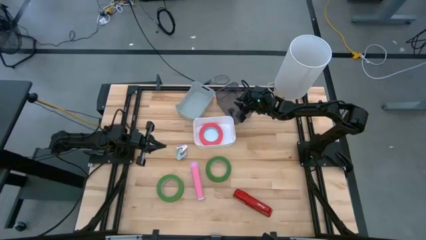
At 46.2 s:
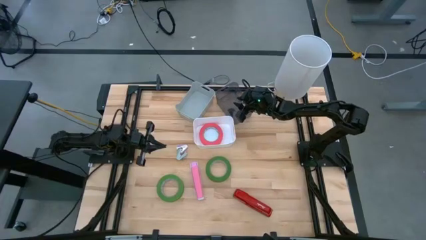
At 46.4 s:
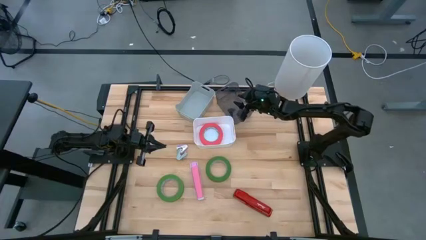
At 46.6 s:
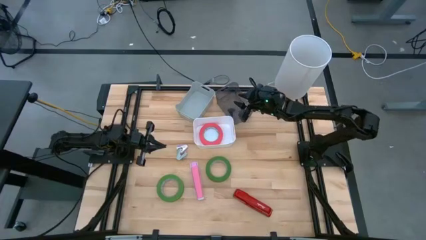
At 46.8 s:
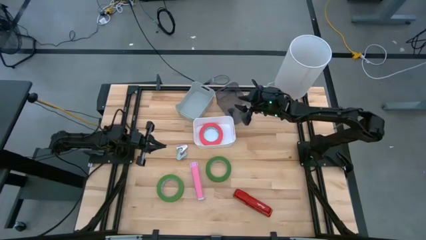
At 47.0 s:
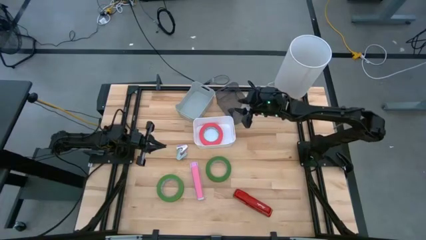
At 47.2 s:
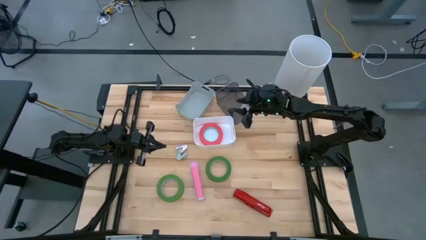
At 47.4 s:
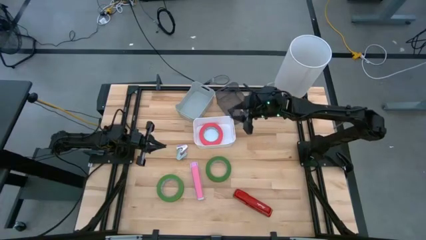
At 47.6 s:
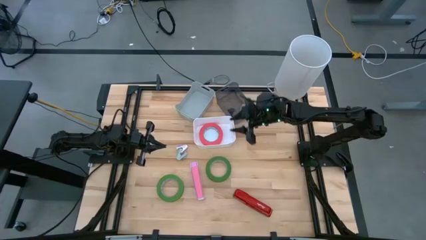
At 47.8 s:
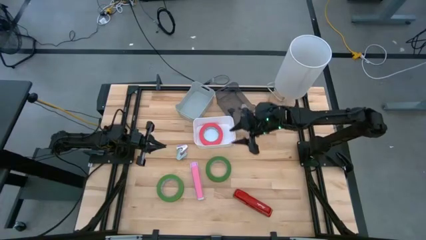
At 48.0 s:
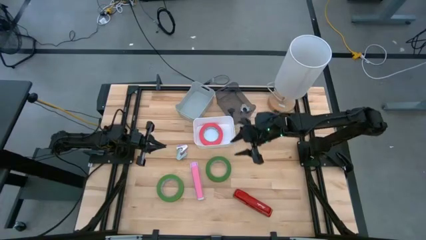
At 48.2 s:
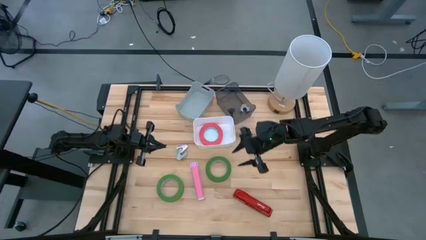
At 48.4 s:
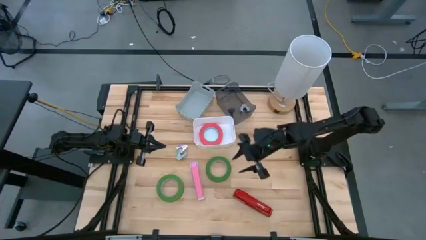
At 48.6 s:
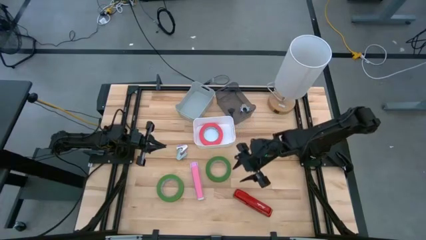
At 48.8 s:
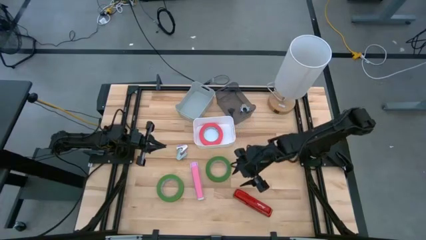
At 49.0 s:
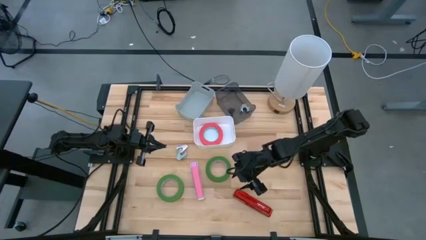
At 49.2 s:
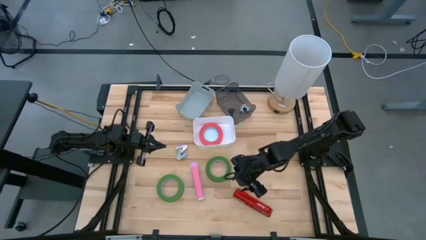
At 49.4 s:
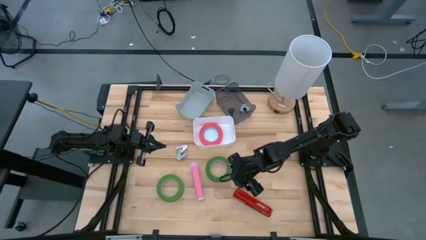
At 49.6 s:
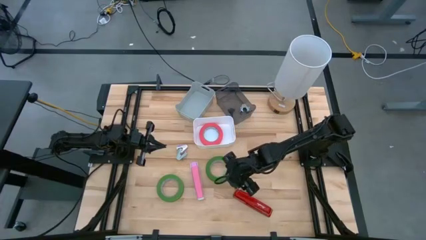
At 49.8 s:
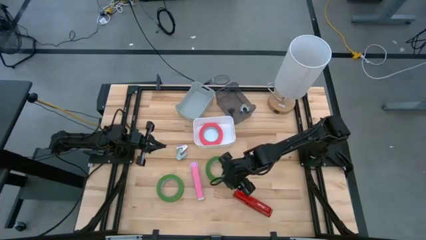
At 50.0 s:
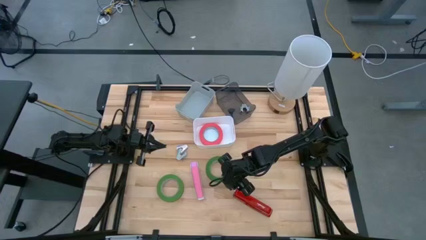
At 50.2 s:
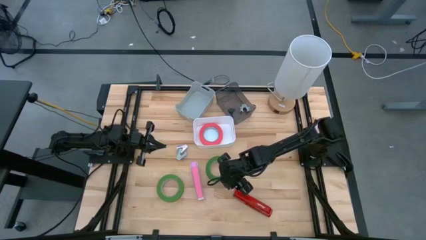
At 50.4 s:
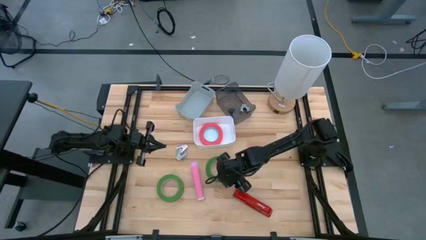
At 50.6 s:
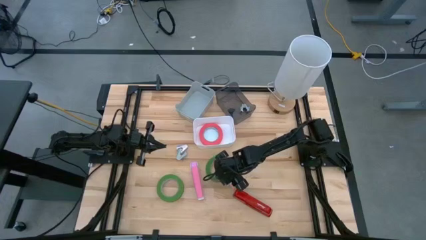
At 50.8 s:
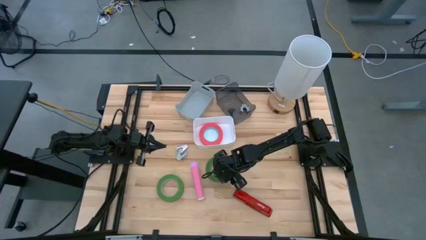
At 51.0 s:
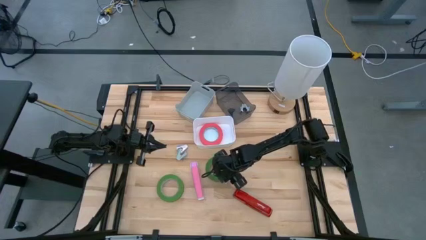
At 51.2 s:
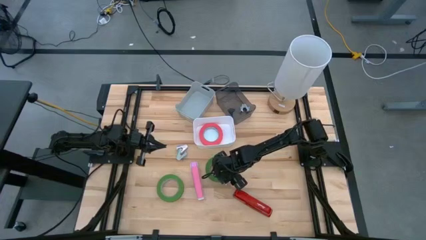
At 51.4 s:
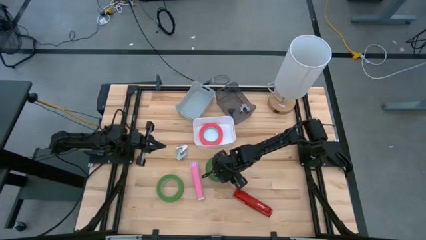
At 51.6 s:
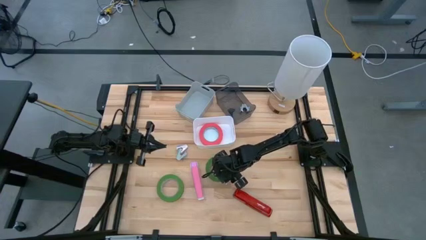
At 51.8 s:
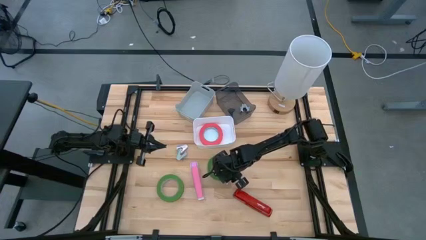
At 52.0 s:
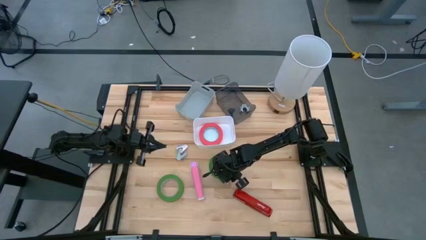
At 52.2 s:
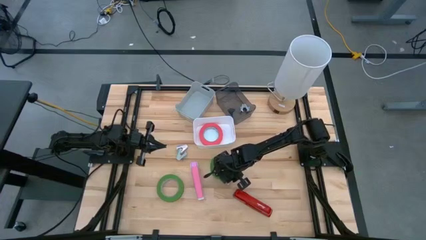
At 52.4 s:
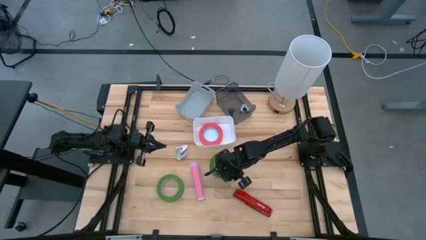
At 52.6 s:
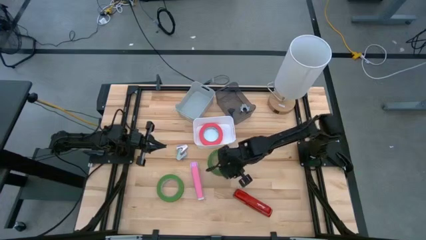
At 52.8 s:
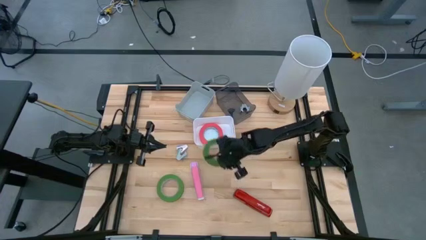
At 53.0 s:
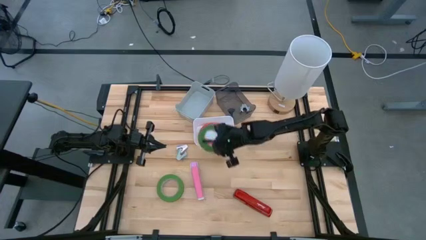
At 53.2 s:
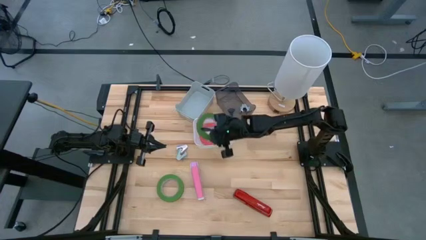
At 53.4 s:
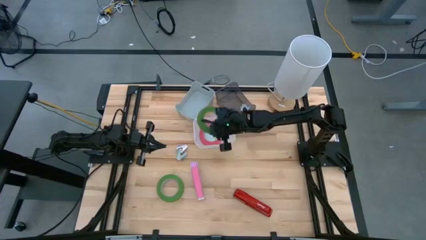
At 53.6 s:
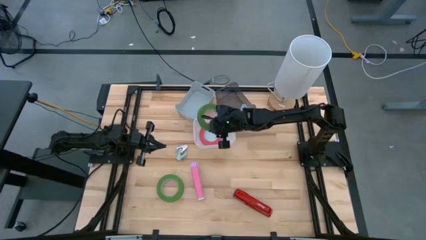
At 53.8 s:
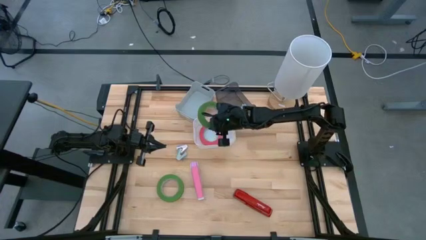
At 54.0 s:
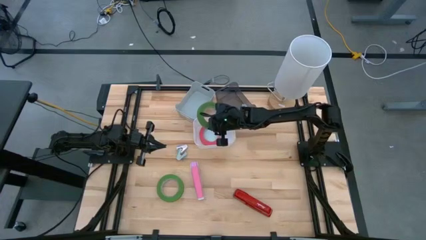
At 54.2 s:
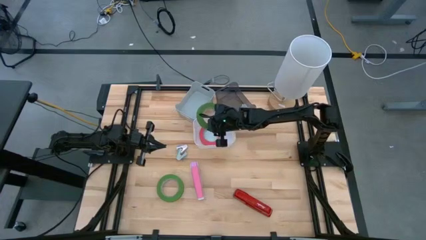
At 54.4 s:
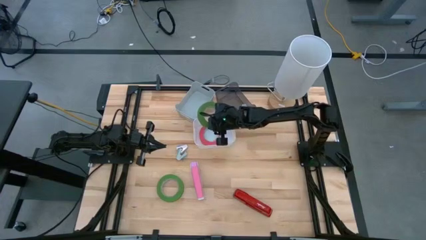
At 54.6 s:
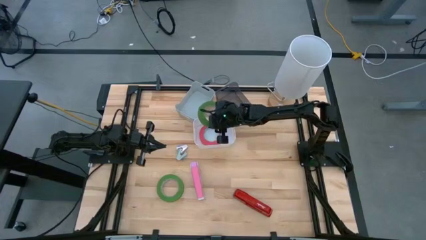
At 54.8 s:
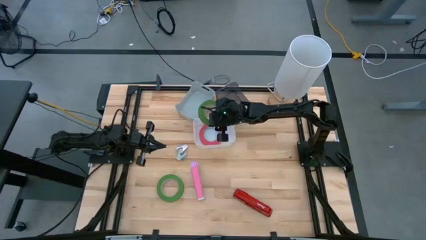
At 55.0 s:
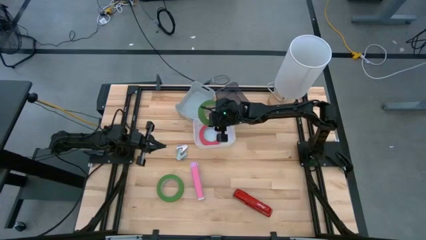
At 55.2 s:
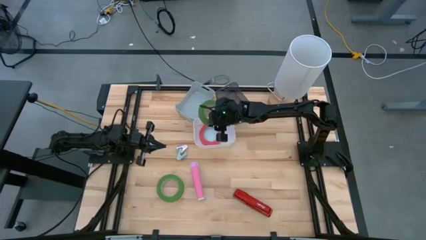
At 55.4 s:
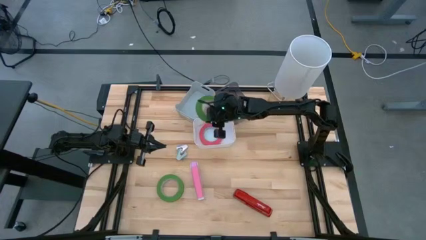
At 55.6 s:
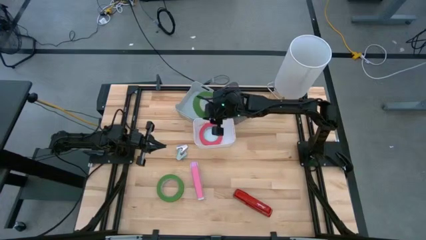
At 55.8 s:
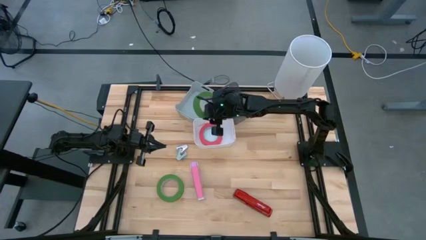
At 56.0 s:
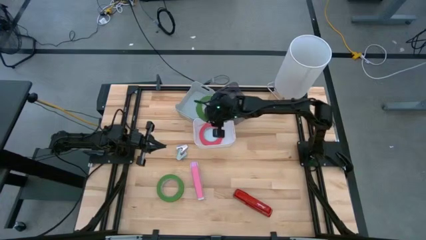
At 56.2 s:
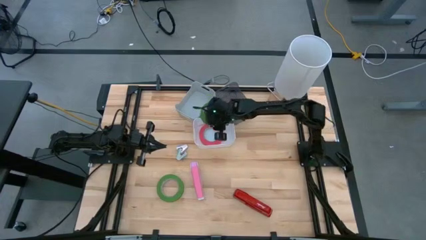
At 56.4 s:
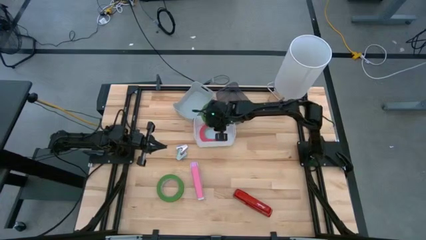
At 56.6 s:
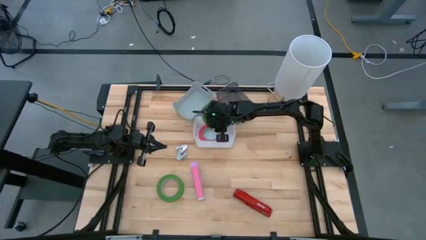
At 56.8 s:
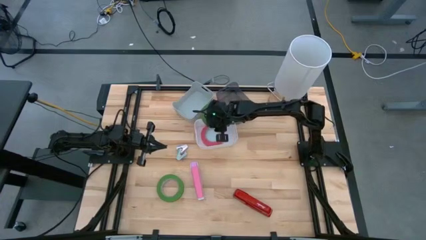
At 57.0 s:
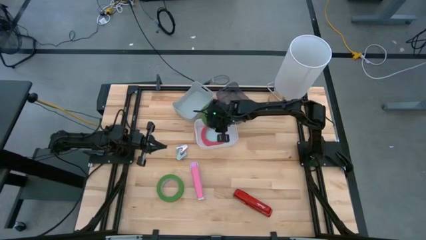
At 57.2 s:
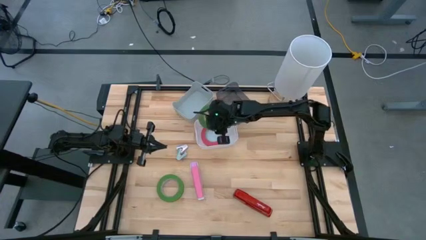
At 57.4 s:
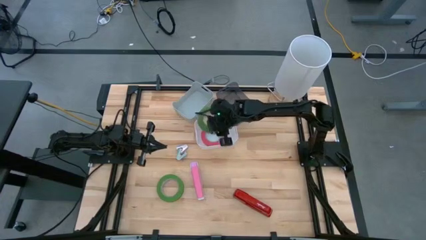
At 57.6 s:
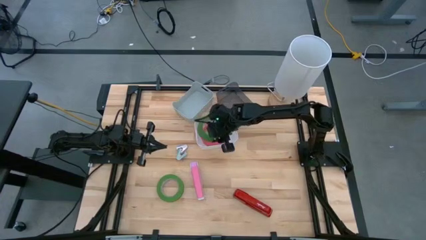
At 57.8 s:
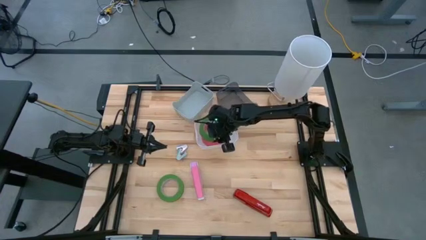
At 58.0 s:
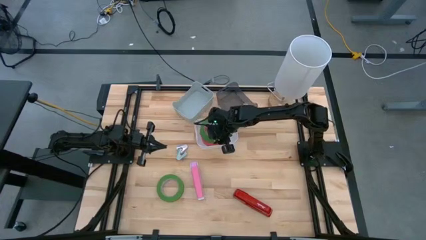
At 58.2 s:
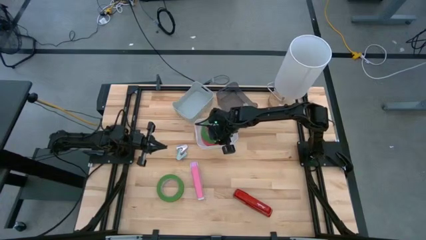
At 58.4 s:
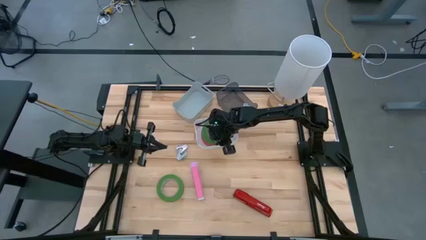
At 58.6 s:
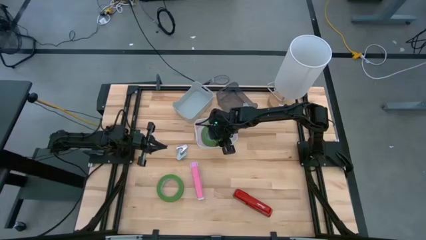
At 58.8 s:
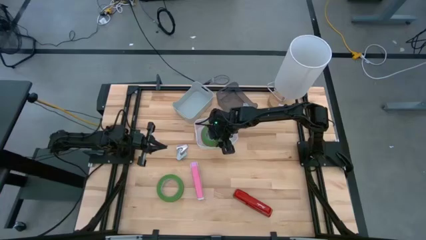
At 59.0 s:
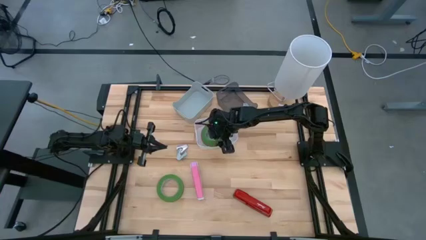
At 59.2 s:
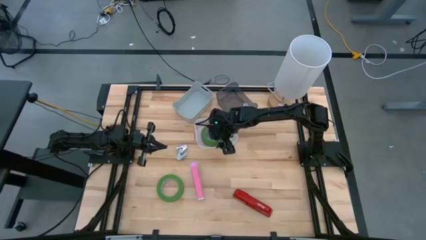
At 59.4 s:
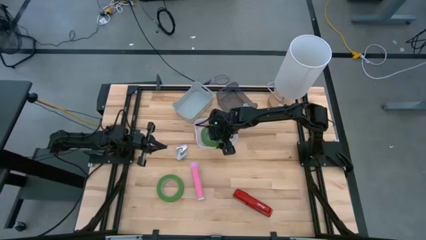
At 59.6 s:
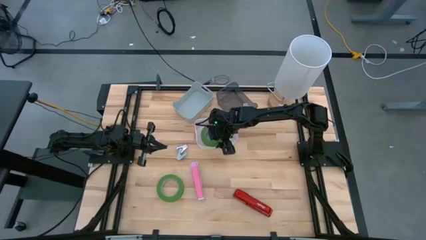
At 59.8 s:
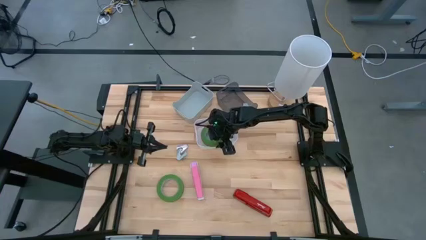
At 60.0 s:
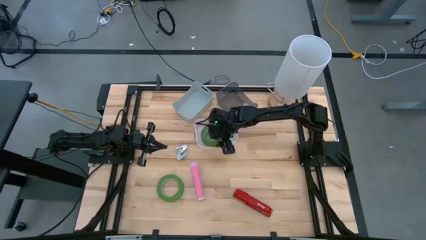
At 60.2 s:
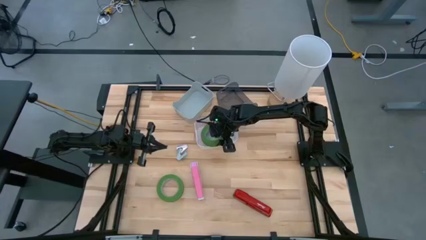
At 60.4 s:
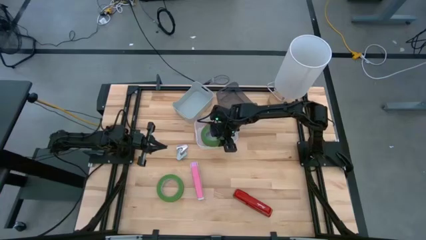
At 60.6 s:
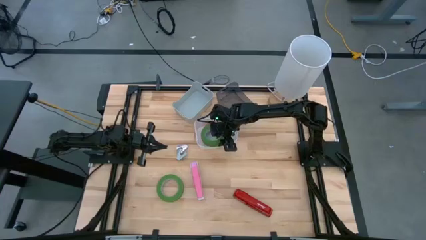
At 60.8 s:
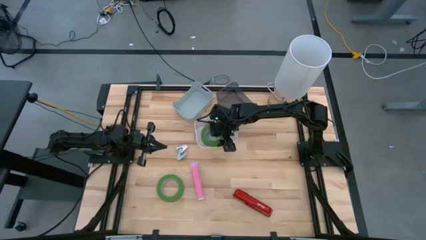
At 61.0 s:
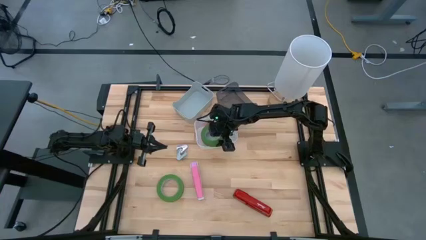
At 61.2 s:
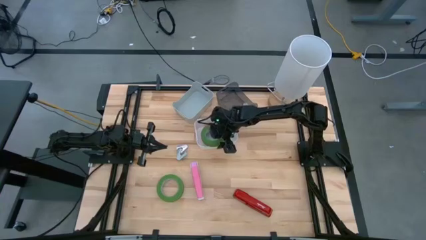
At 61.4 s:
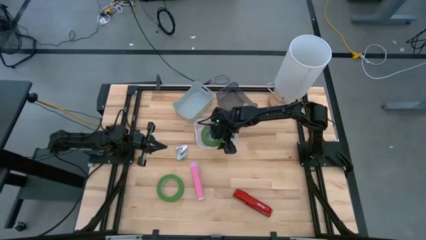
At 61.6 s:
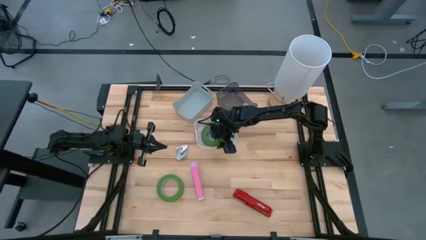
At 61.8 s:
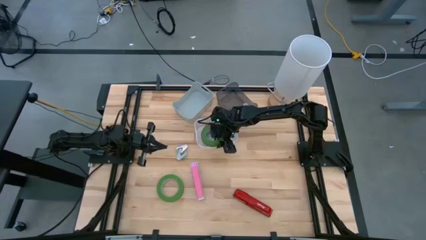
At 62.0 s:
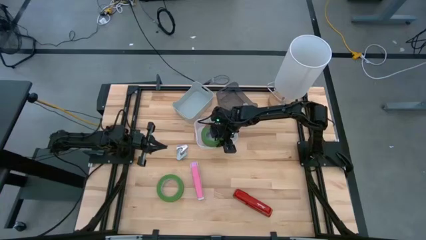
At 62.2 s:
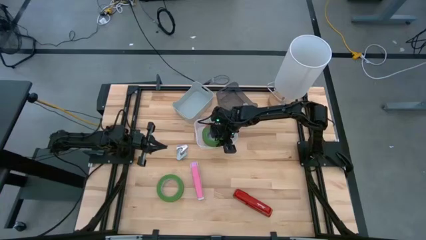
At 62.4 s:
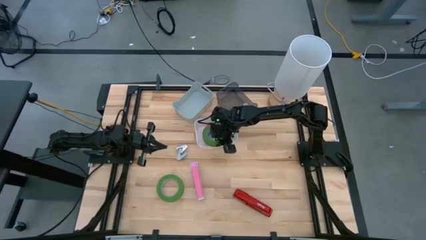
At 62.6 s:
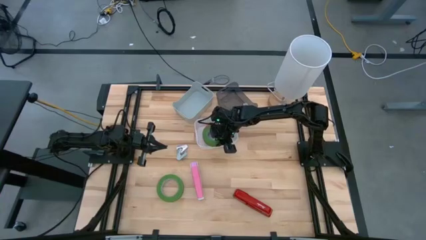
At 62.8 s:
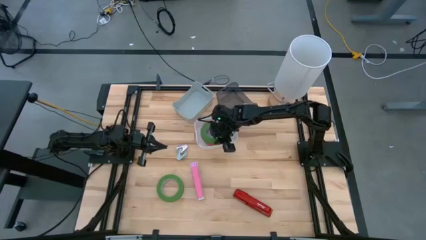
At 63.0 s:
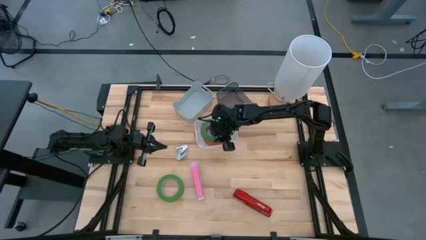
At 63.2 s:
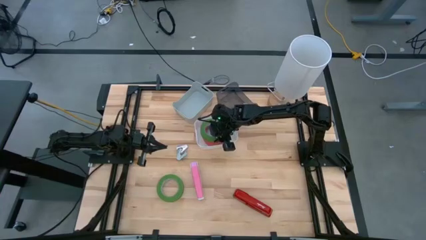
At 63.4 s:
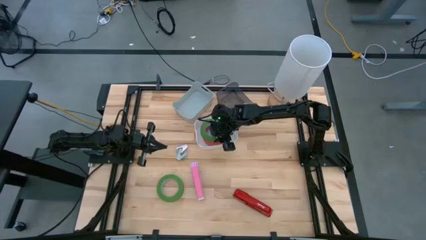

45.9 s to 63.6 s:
Task: Pick and place Stapler, Stapler remover, tape
Put the top green tape into the white bin
